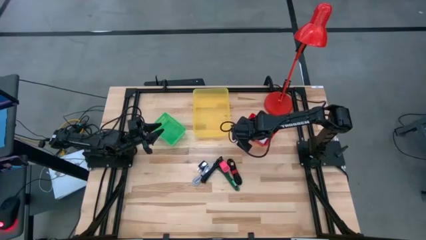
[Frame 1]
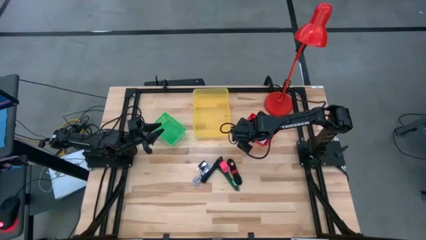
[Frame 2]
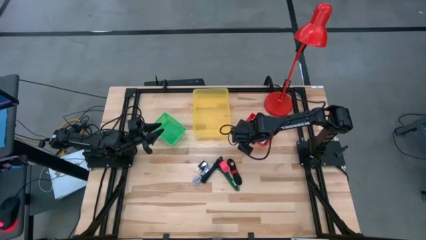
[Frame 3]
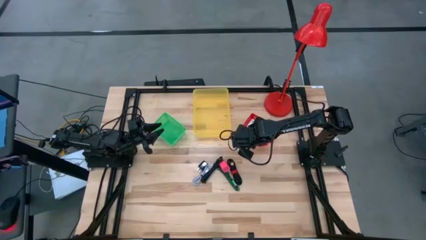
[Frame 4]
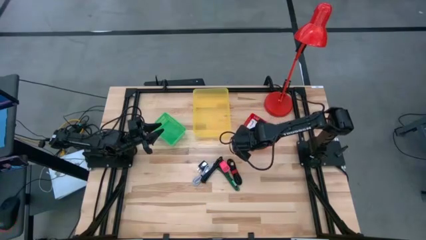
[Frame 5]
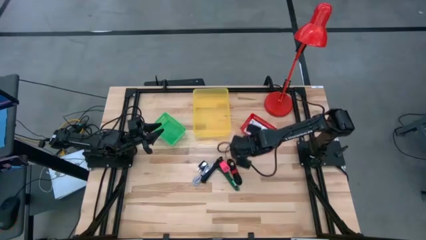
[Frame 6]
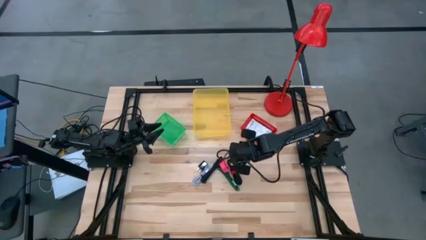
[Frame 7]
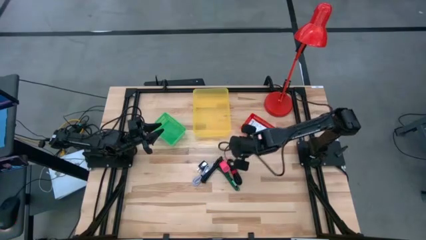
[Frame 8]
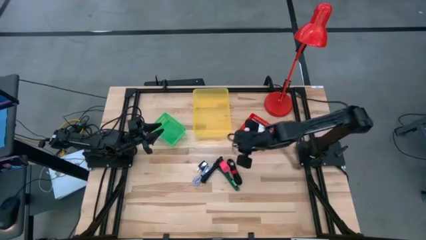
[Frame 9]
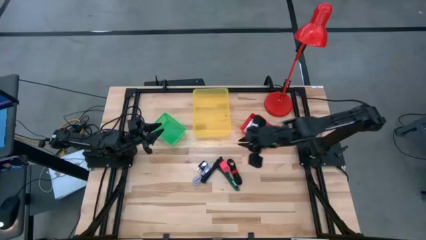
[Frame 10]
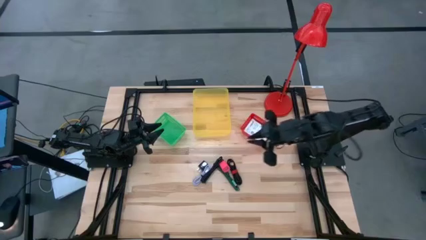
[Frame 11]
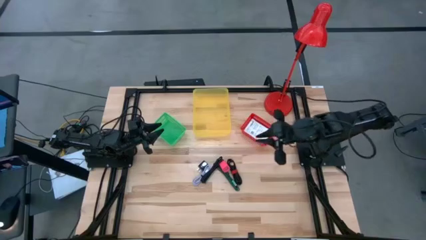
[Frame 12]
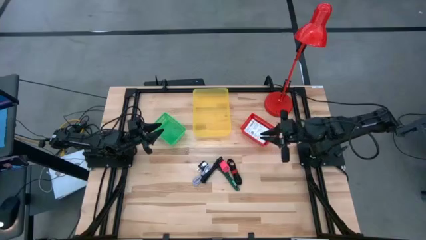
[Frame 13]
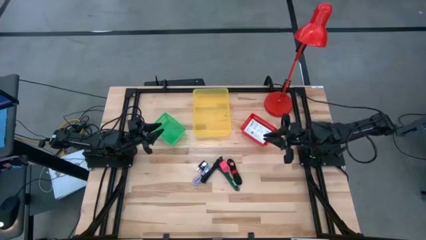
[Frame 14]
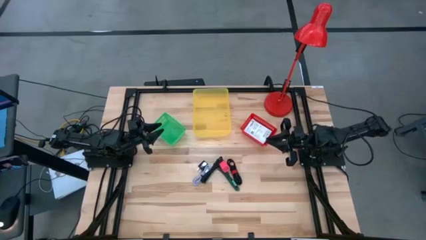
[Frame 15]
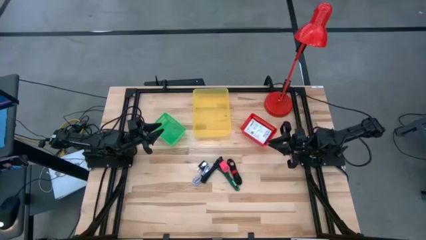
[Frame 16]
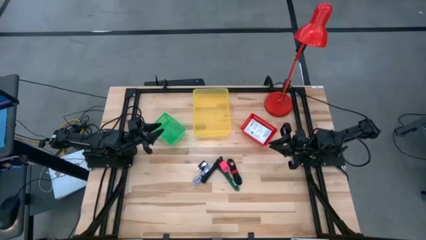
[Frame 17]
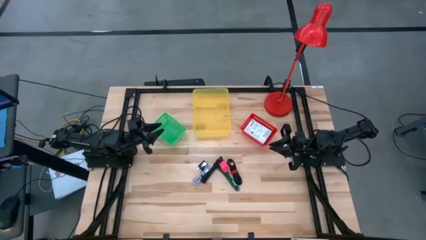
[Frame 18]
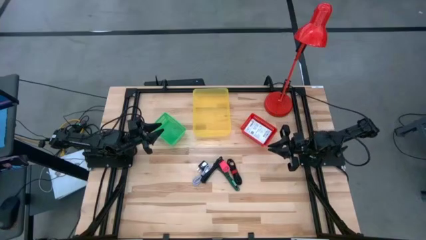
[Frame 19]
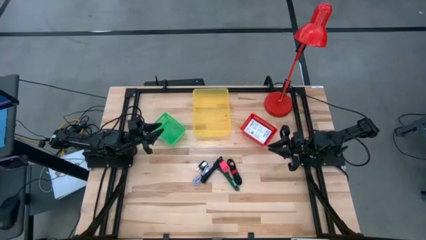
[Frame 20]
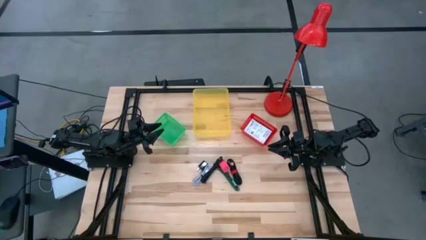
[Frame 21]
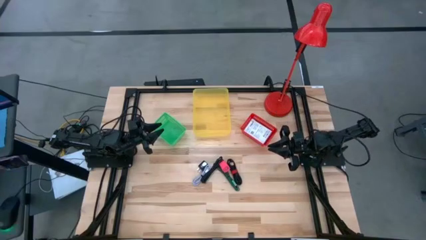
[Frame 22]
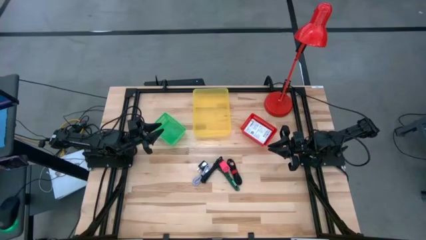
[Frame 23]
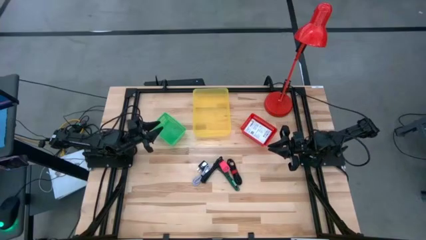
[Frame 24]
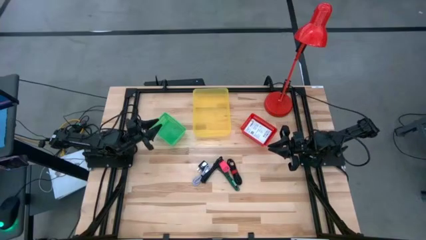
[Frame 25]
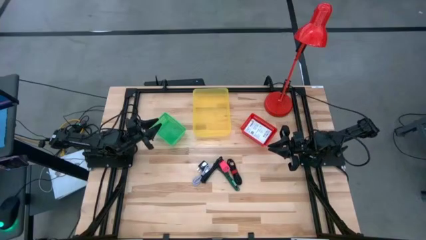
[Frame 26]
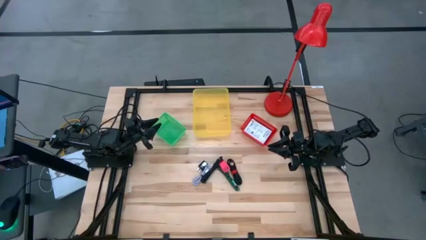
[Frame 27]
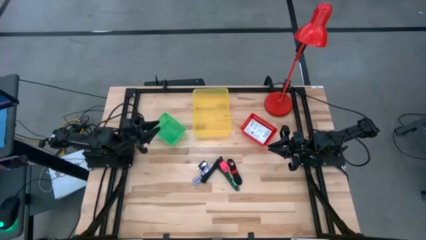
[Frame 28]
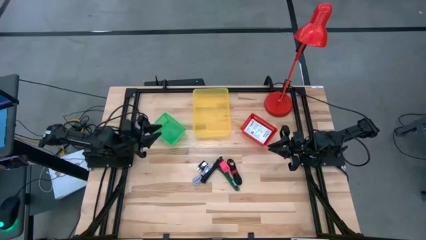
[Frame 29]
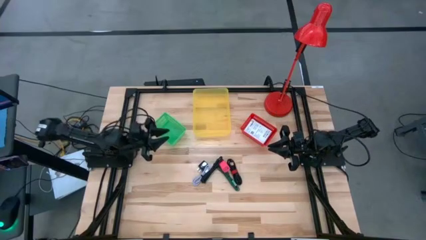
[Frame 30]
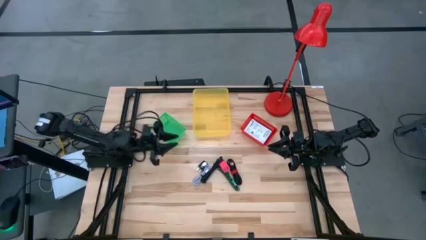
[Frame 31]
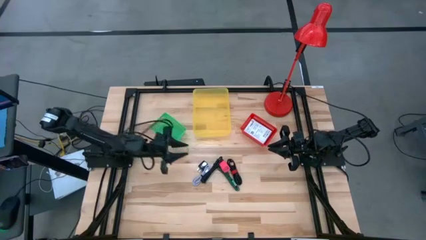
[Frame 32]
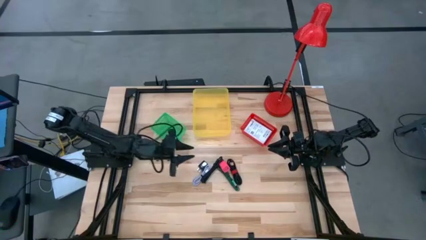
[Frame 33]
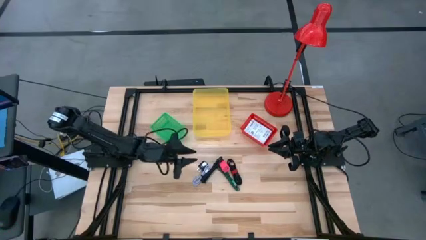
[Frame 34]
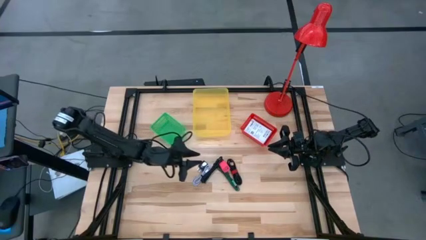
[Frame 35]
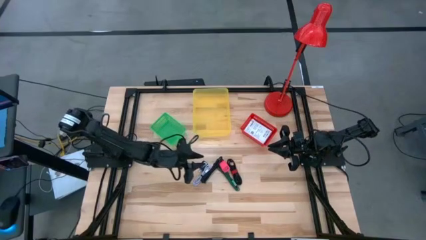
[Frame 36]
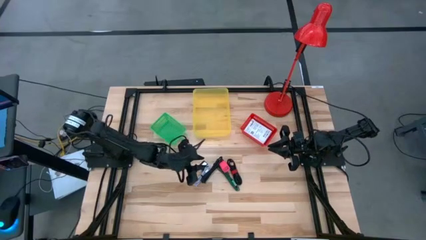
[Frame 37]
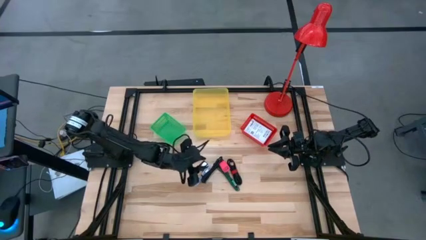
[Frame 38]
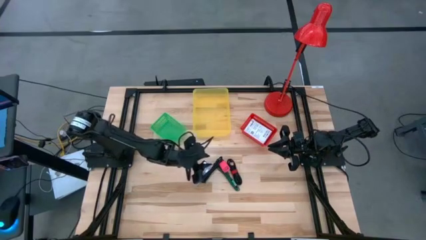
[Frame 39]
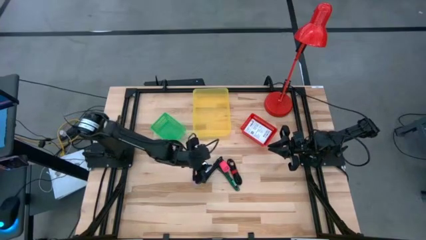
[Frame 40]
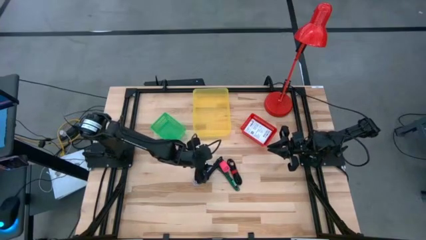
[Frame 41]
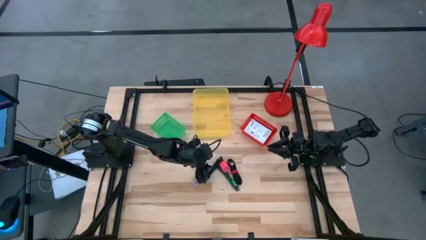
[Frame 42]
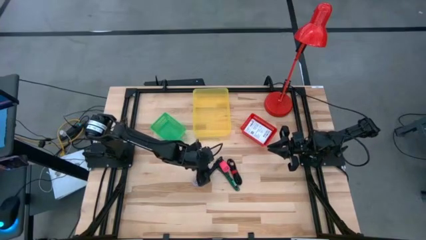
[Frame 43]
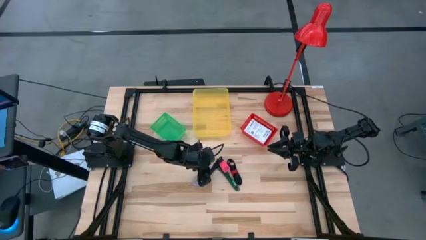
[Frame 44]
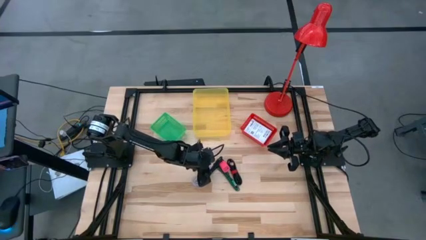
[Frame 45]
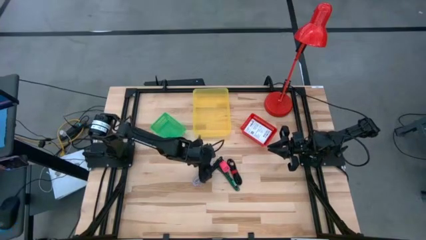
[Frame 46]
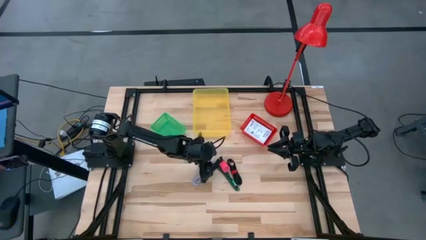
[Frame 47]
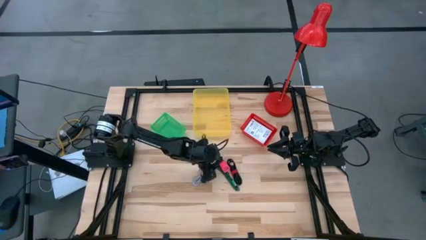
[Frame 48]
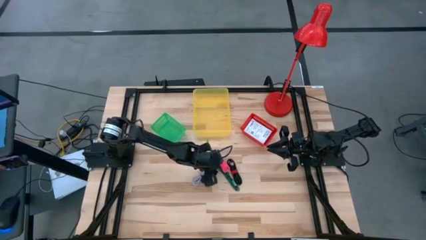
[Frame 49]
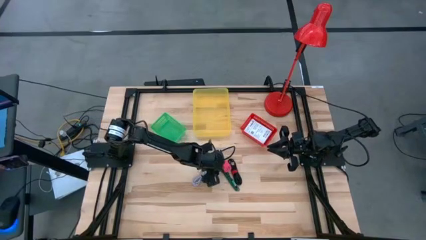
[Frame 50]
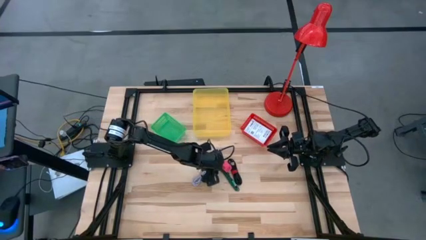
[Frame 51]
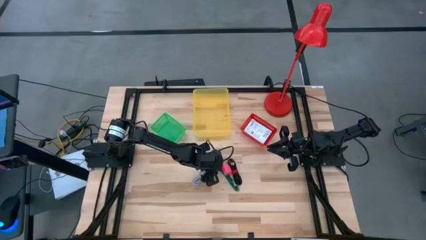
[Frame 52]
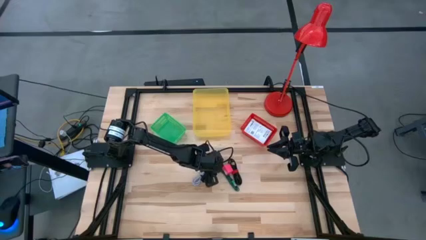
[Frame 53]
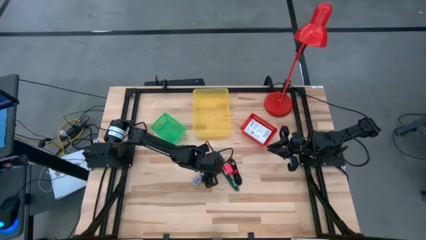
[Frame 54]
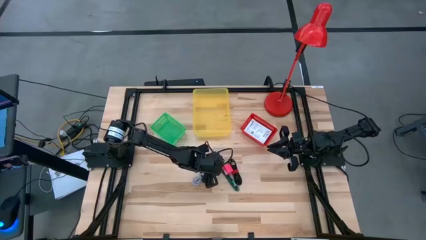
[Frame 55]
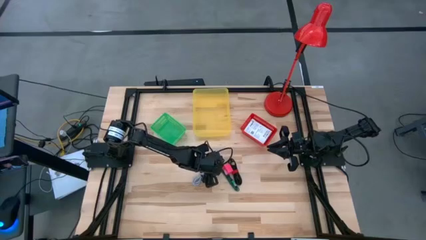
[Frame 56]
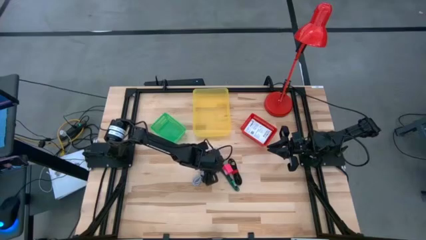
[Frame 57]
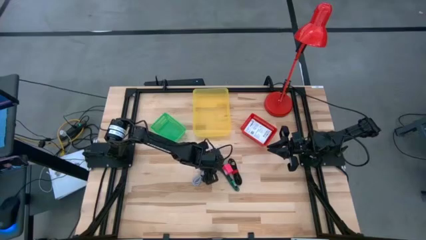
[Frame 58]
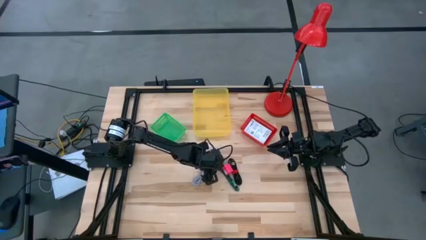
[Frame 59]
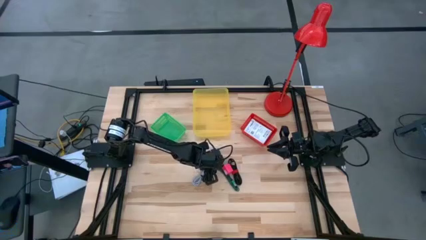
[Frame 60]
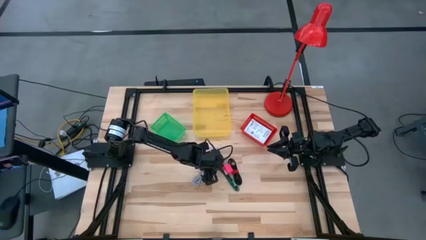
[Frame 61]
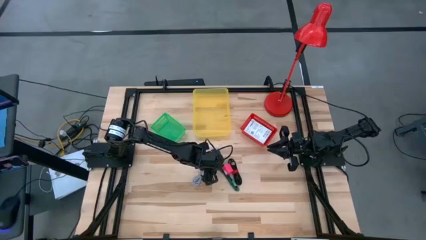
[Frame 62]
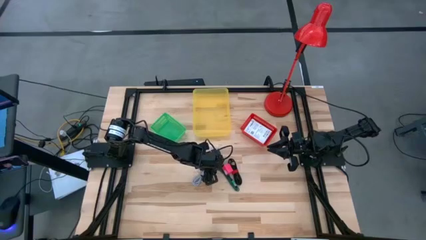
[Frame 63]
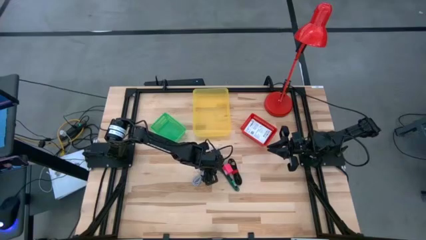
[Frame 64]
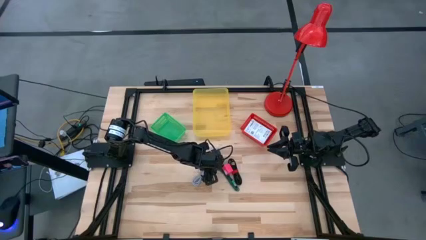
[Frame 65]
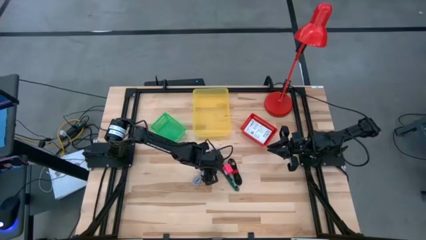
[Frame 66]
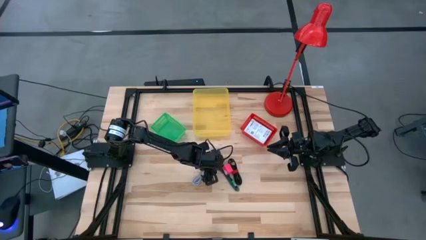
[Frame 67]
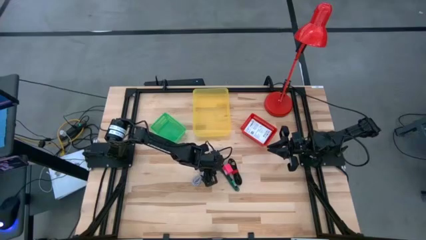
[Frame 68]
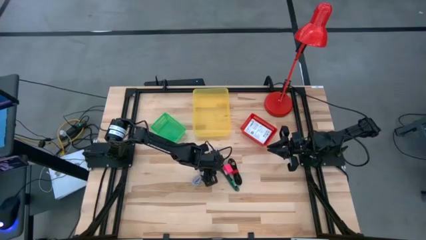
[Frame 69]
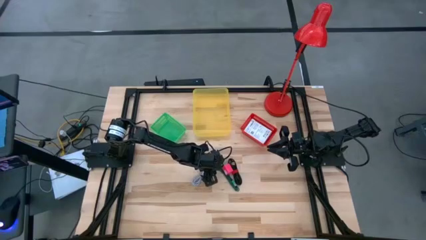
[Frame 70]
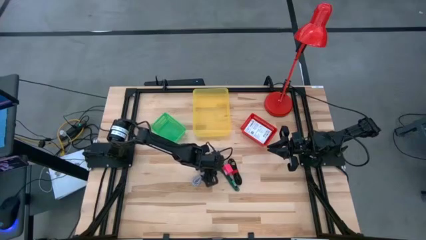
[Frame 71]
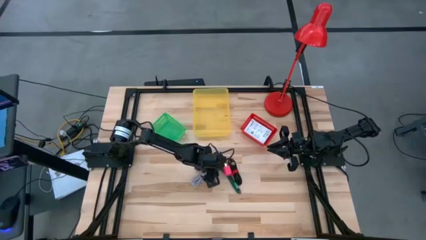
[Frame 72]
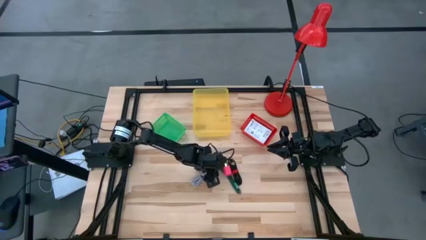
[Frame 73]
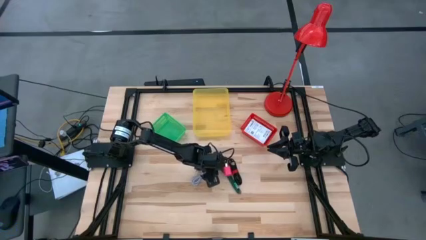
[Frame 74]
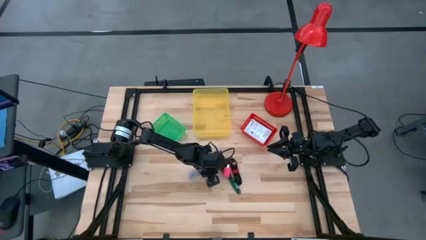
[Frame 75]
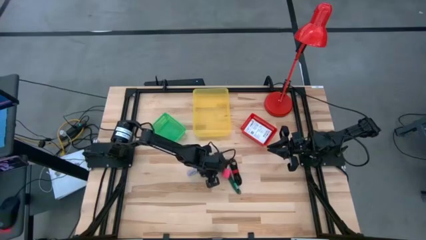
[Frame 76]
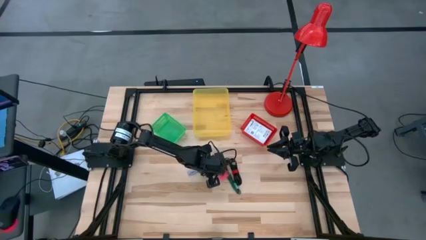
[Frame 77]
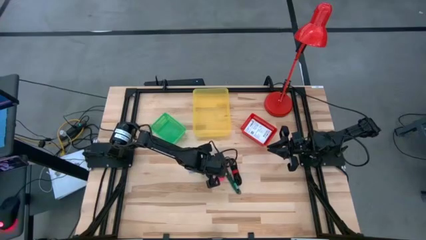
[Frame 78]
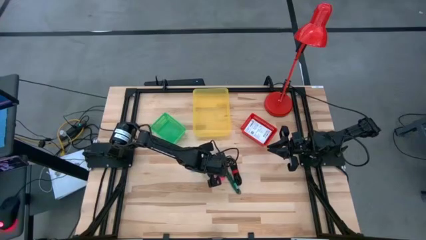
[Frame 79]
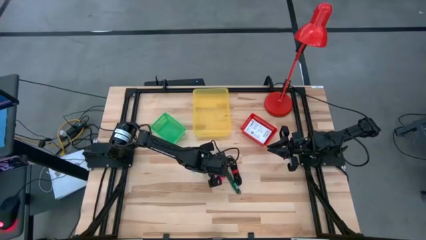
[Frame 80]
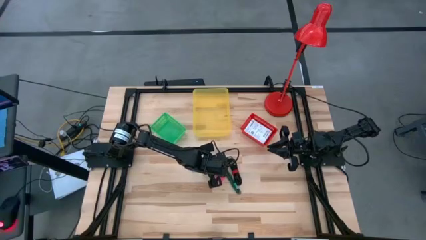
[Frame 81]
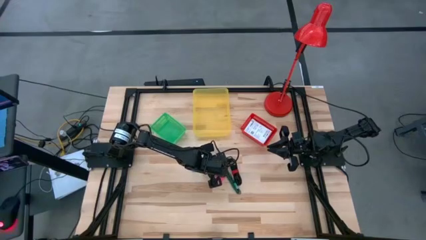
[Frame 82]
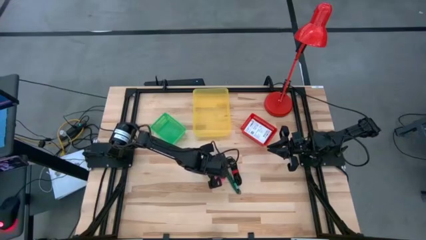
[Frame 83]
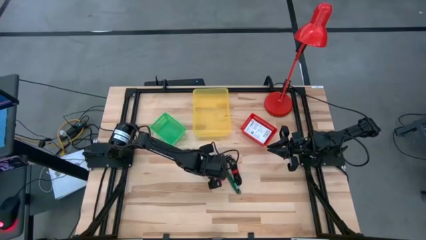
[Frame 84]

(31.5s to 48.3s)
Task: Pick and place items into bin
Put the left black charger cable into the yellow bin
